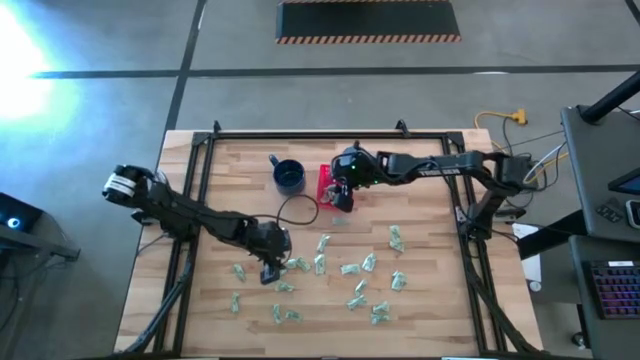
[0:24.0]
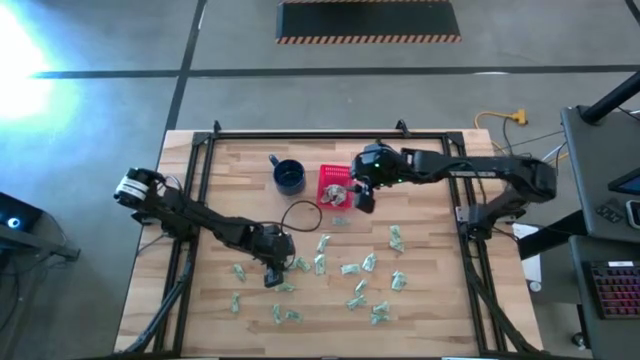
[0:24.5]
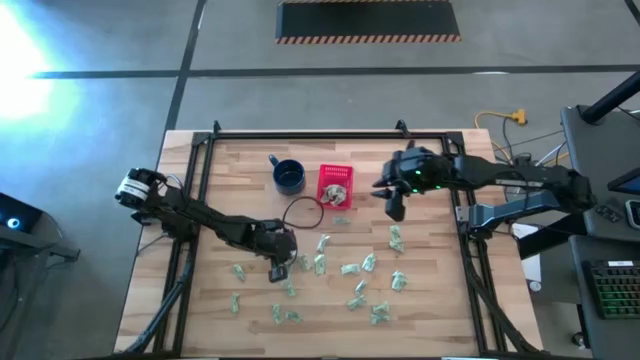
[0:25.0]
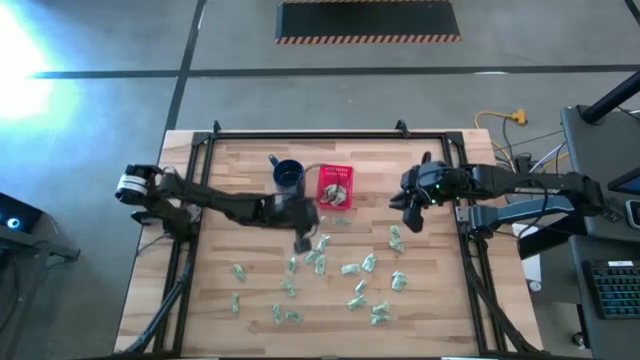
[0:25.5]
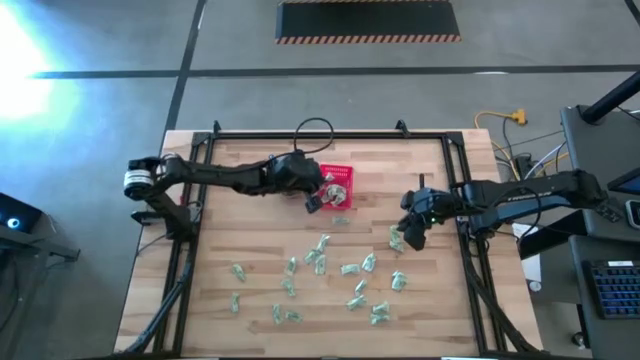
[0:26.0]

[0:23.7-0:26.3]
Task: Pick and place Stevia / Truvia into bins
Put the stevia packet into the basket

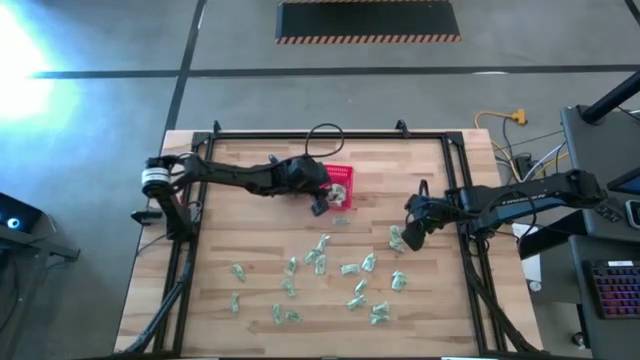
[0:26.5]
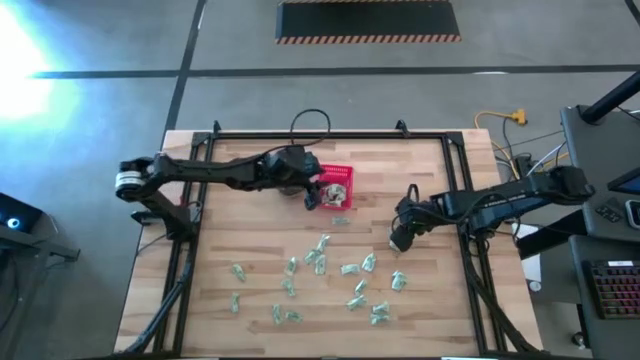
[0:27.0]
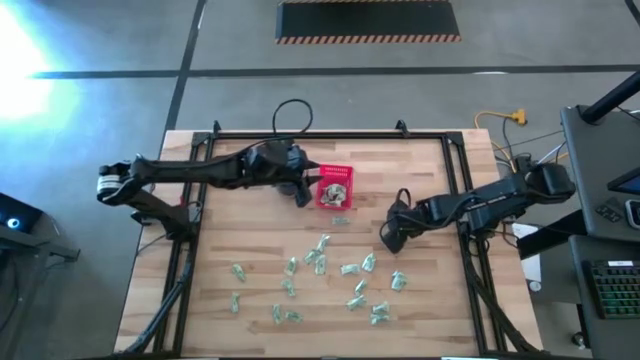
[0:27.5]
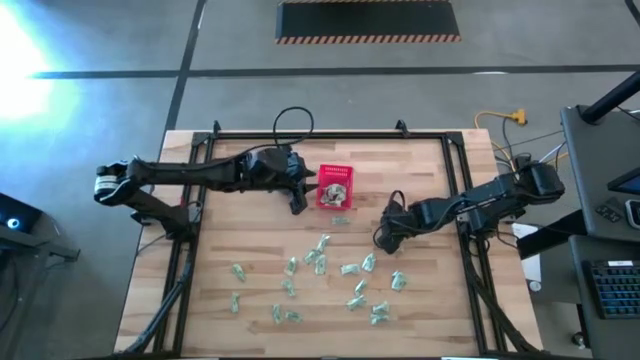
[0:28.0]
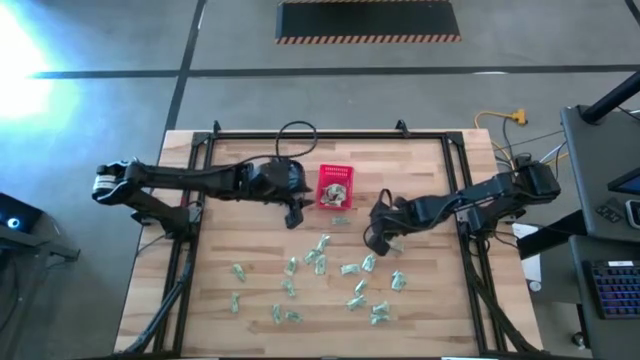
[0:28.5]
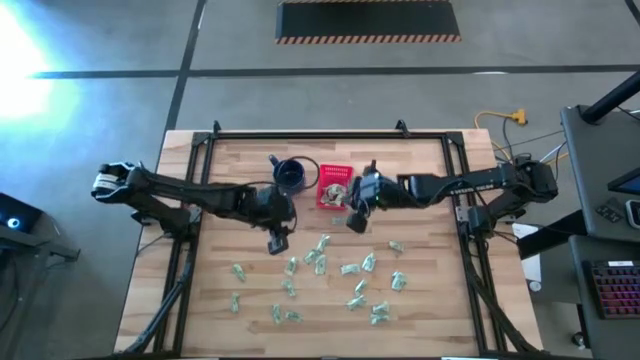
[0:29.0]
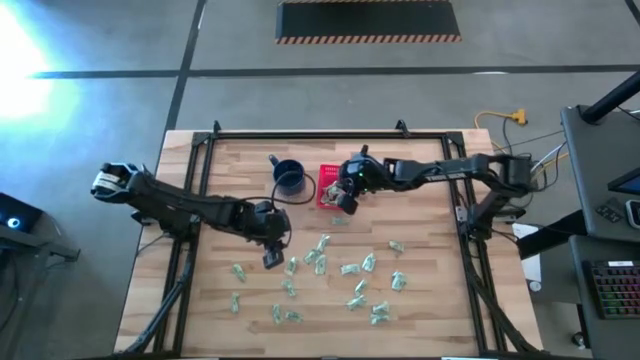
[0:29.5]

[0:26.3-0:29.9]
Put the stevia packet into the basket

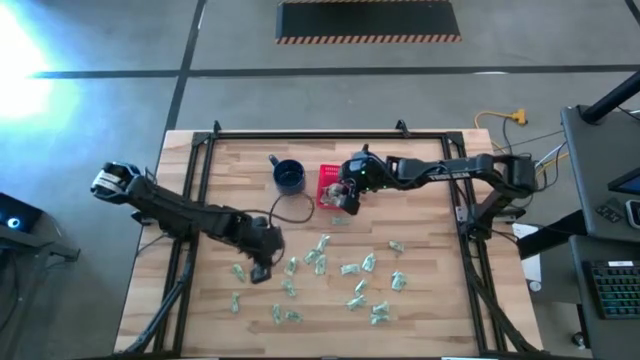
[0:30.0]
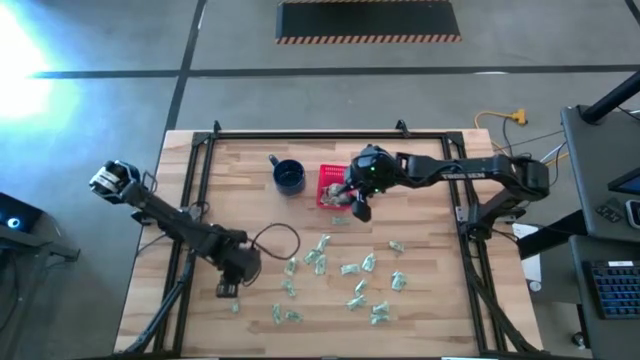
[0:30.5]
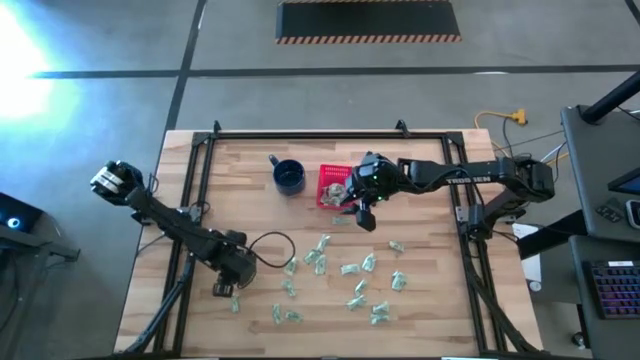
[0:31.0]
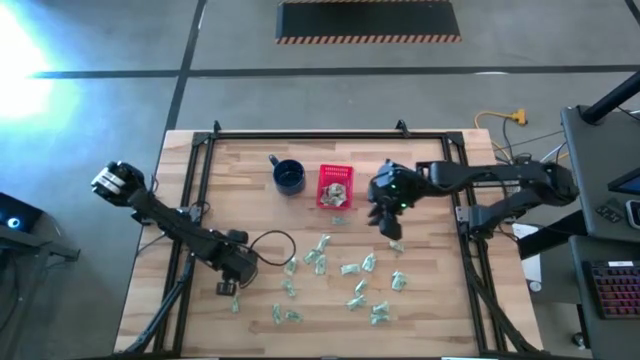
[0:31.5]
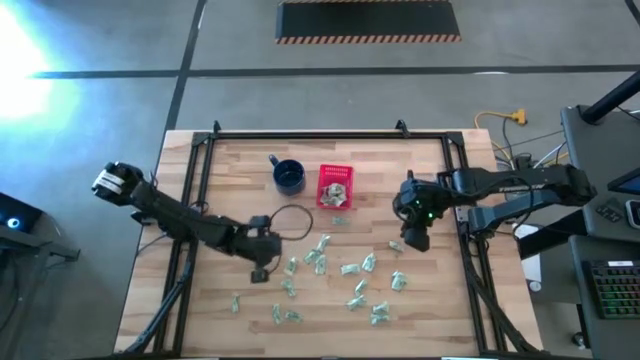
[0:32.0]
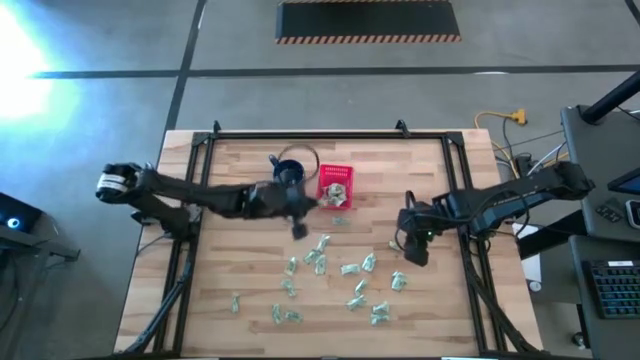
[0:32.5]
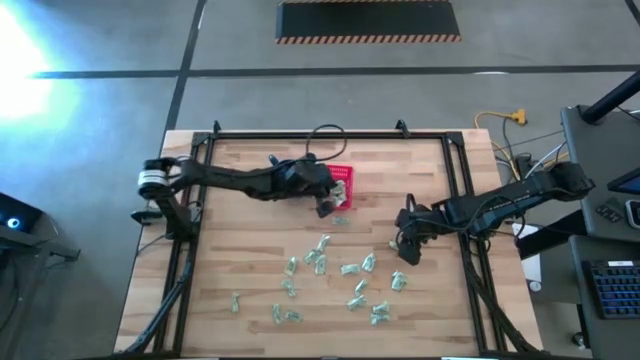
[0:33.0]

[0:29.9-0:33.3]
Put the stevia packet into the basket

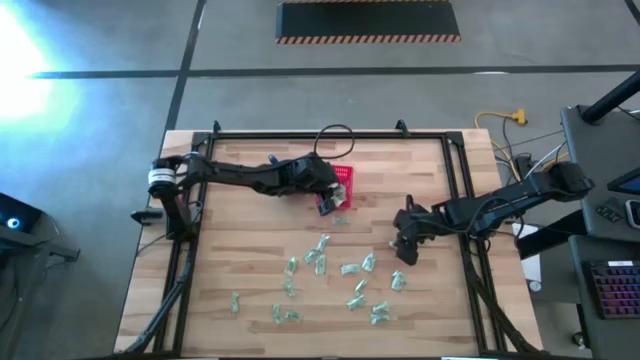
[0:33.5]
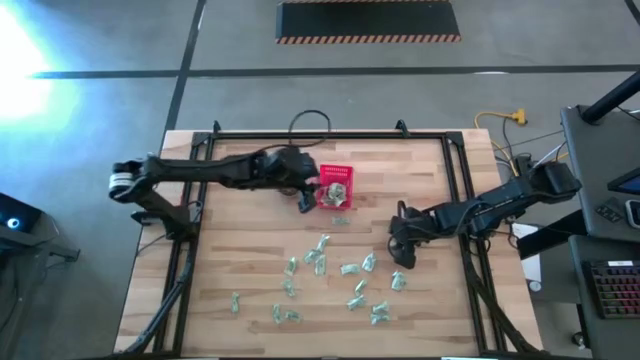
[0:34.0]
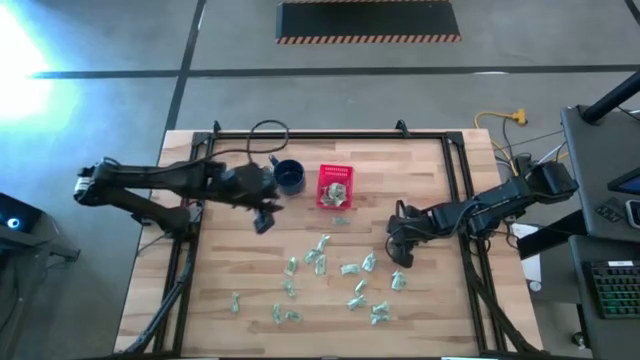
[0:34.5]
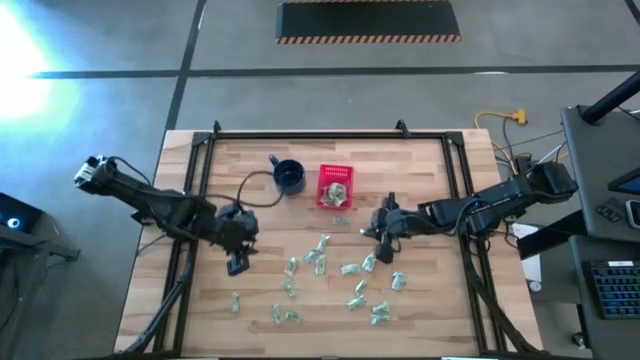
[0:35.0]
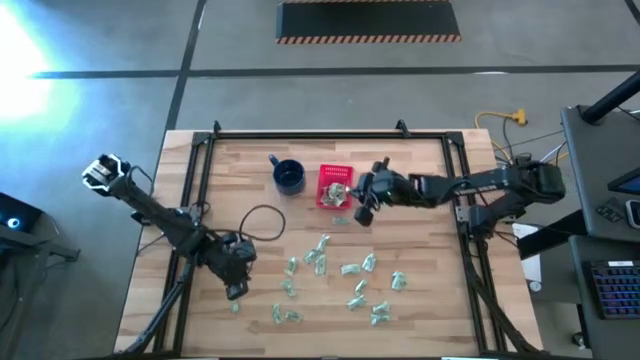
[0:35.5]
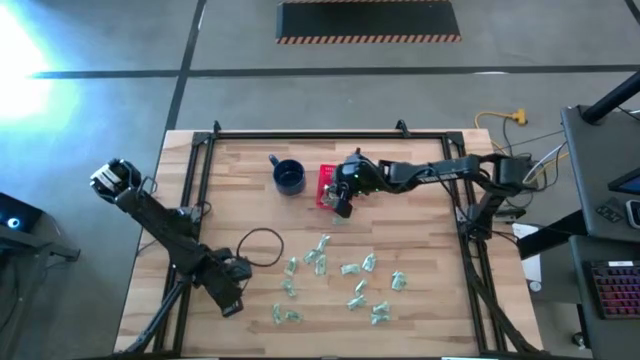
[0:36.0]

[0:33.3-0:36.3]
Put the stevia packet into the basket

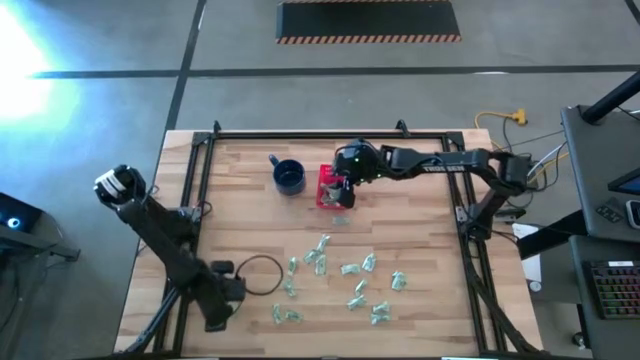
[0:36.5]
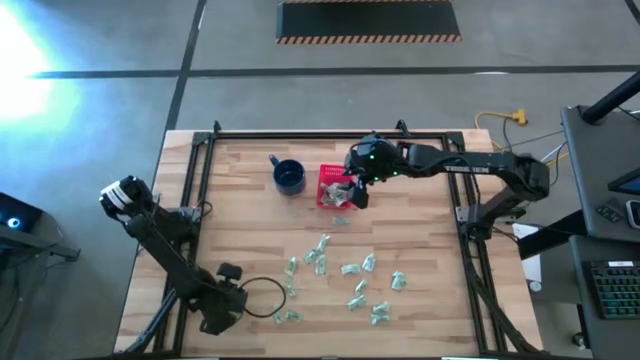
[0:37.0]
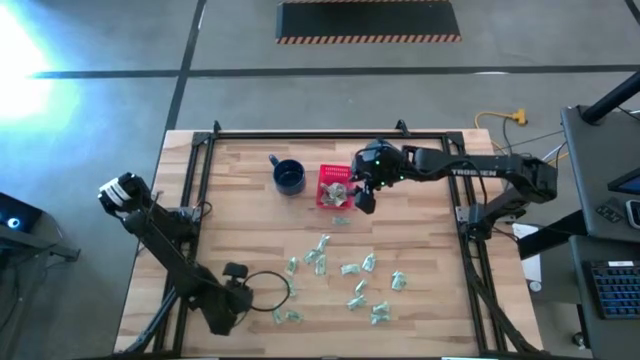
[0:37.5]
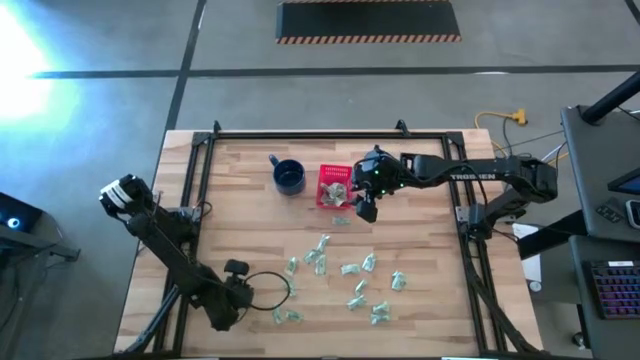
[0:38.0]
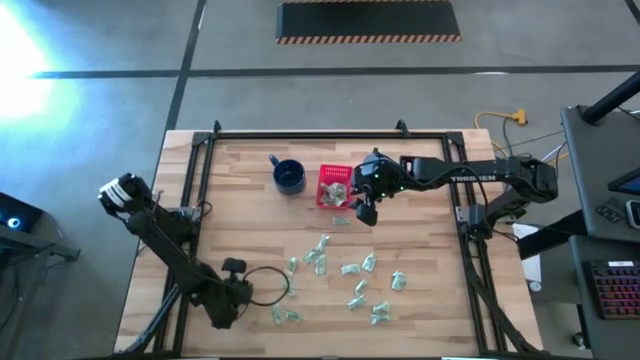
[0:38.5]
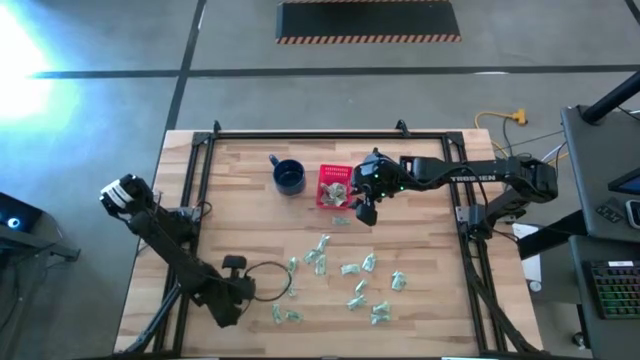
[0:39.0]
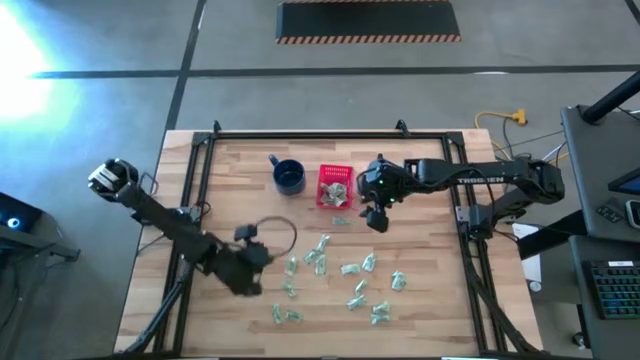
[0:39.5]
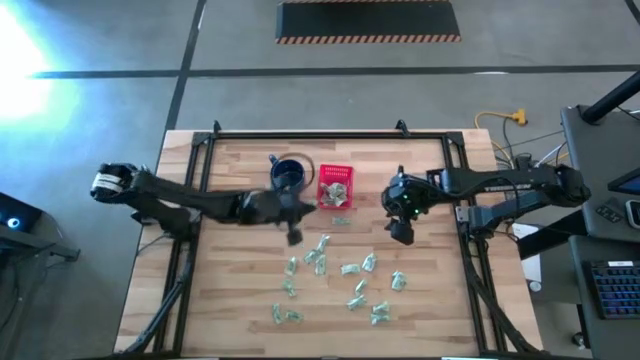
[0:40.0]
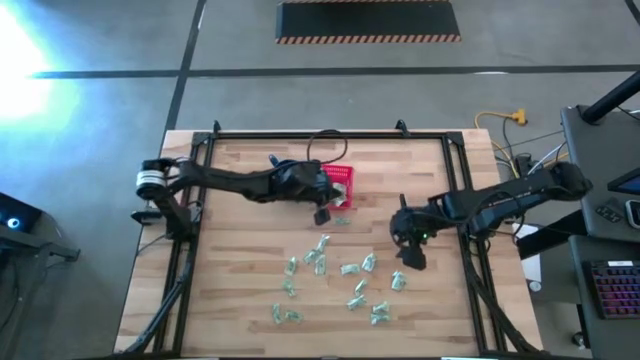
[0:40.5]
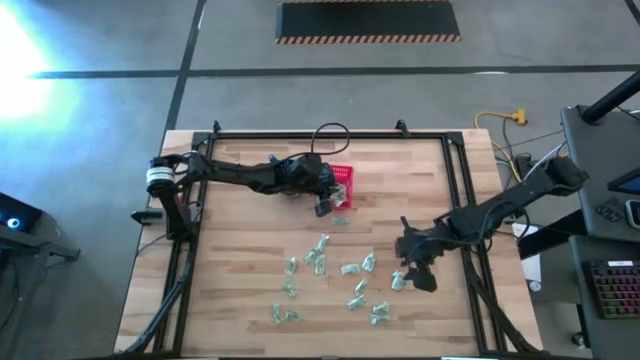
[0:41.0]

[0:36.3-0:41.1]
Put the stevia packet into the basket

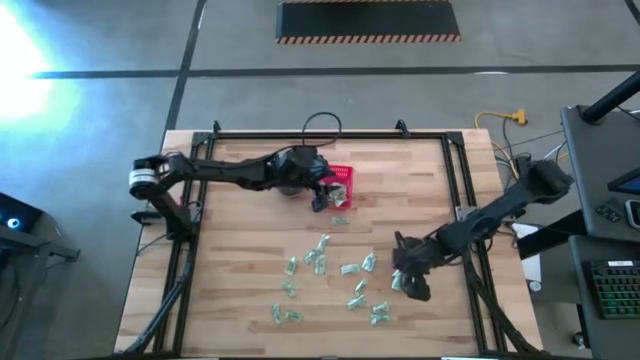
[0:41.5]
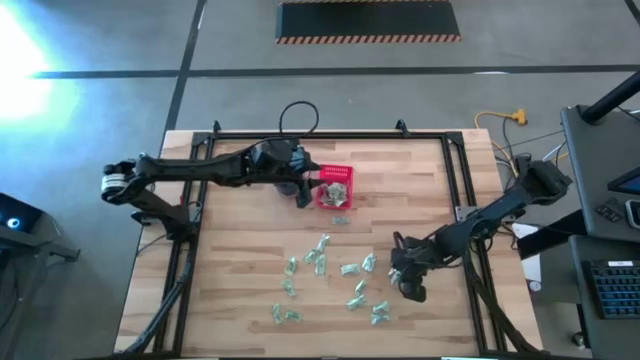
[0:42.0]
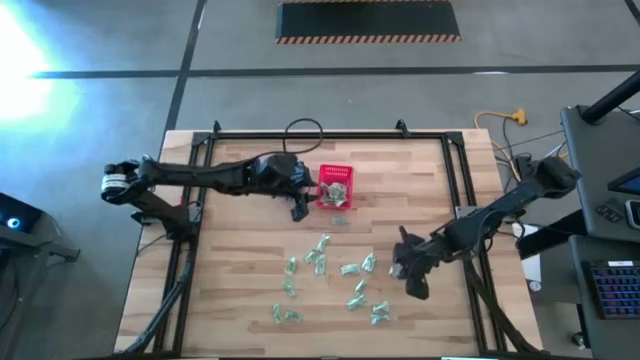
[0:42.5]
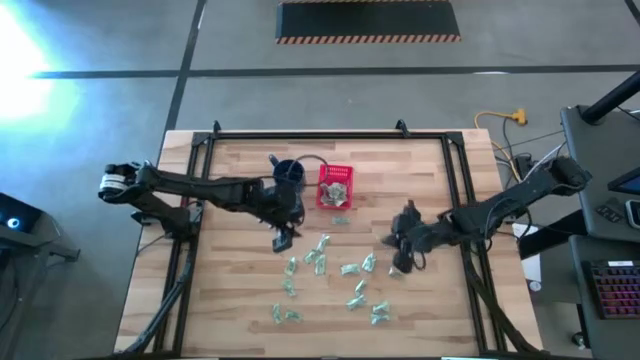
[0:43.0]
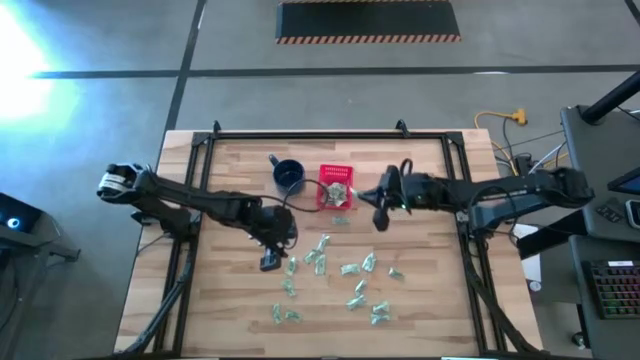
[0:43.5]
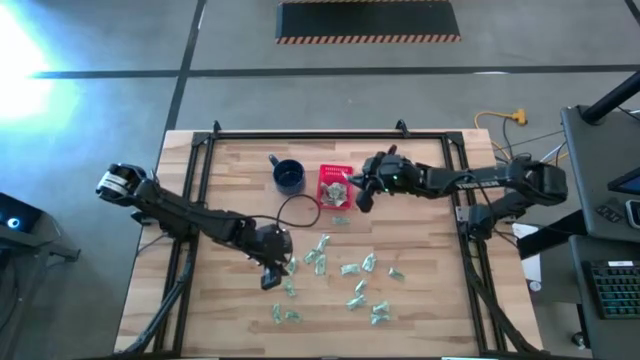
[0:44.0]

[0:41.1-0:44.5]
Put the stevia packet into the basket

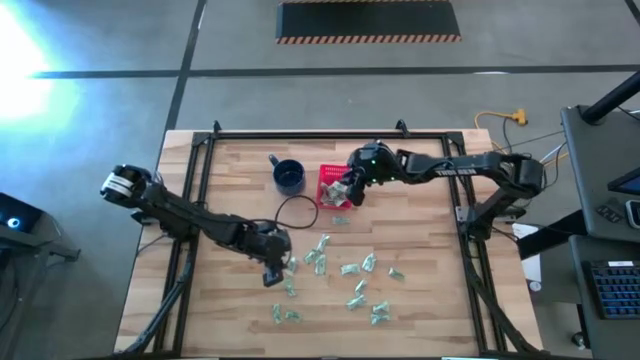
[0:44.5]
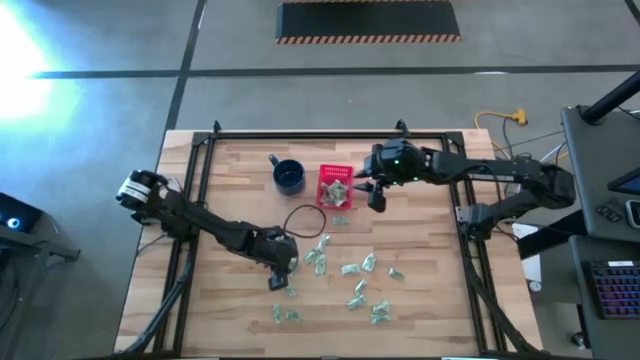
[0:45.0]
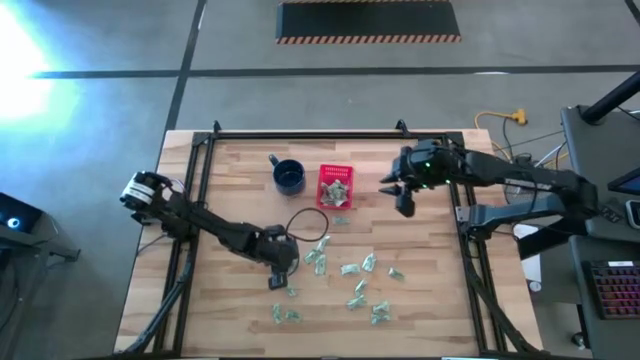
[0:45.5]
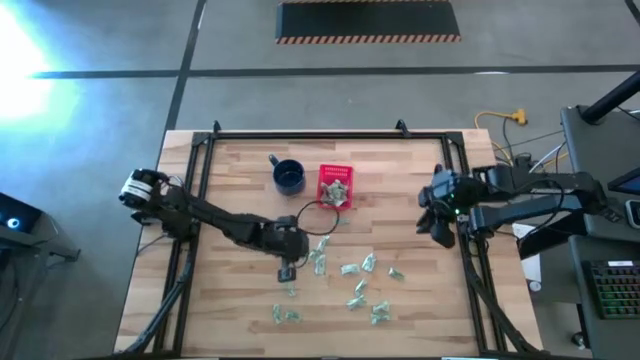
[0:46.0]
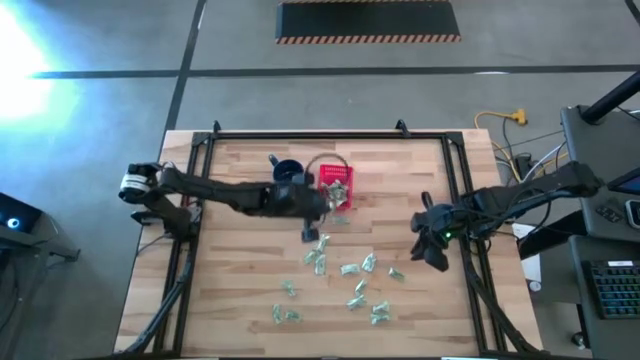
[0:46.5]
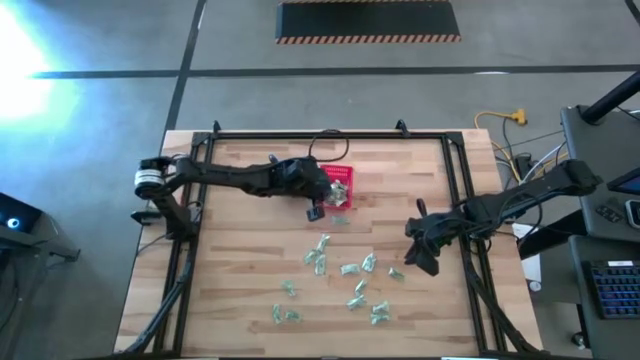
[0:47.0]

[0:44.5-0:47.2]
Put the stevia packet into the basket
